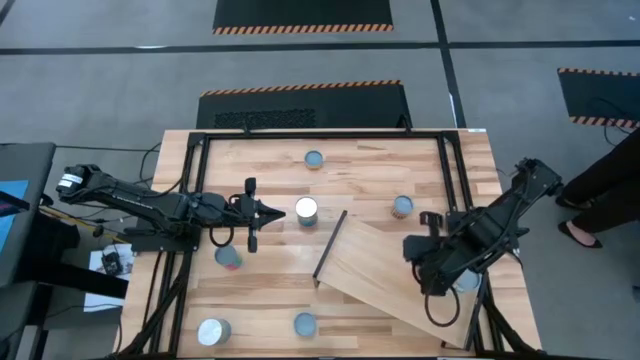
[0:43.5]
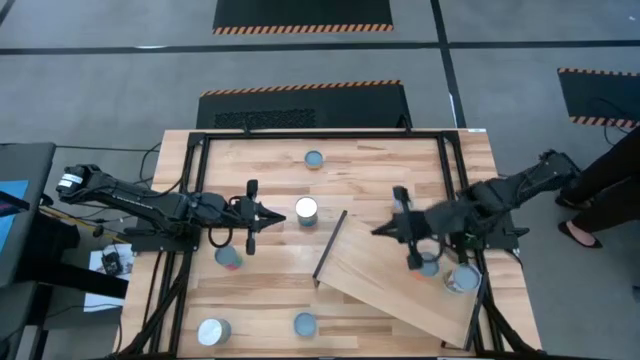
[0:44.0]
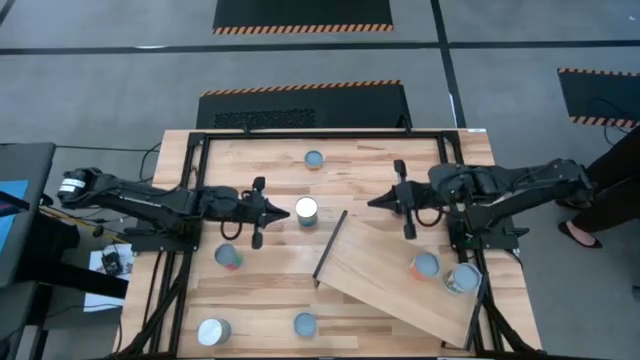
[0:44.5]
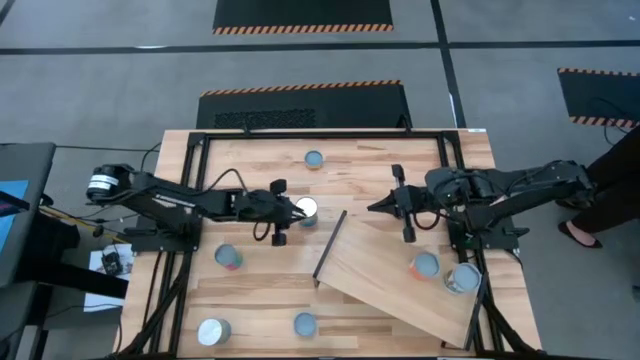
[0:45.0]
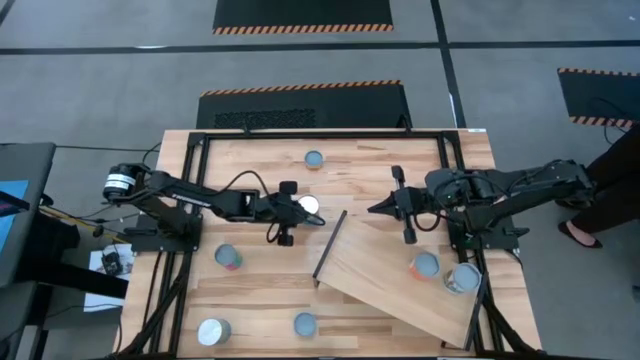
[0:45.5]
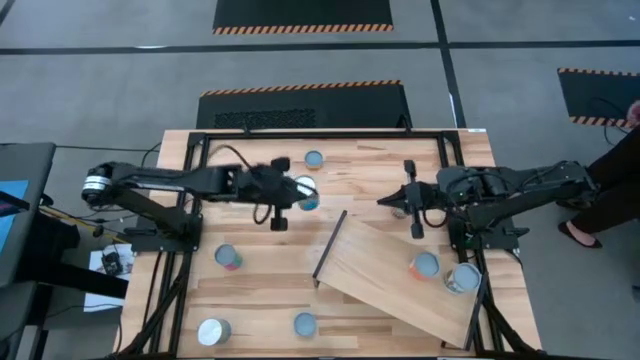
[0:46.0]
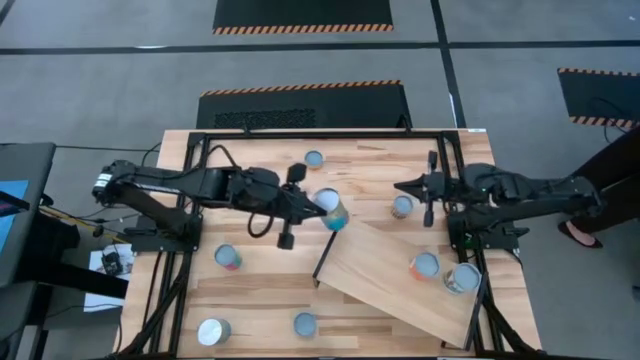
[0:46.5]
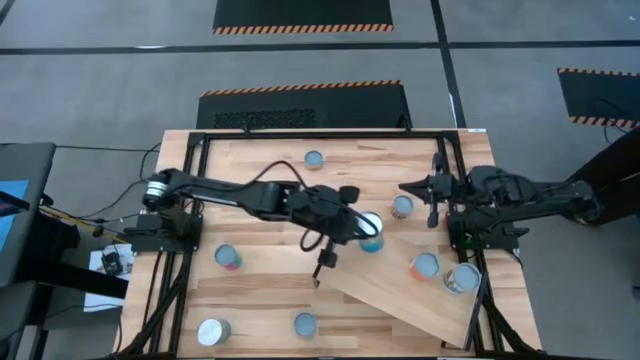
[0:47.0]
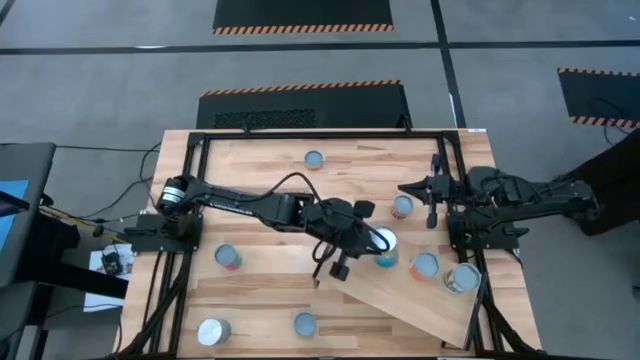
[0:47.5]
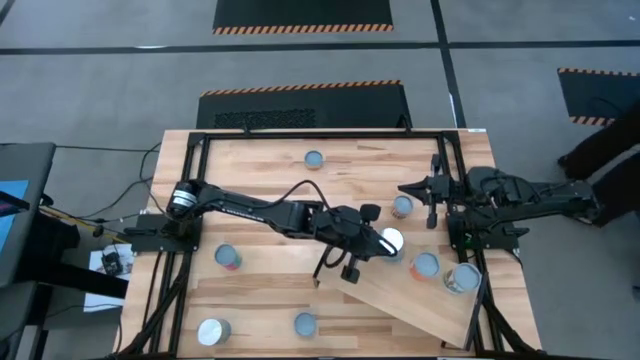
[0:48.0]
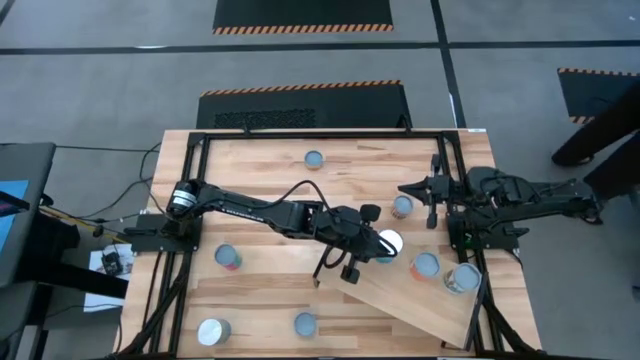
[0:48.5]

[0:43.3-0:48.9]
Task: Pick and place cans onto a shelf
Put the canned cherries on the shelf

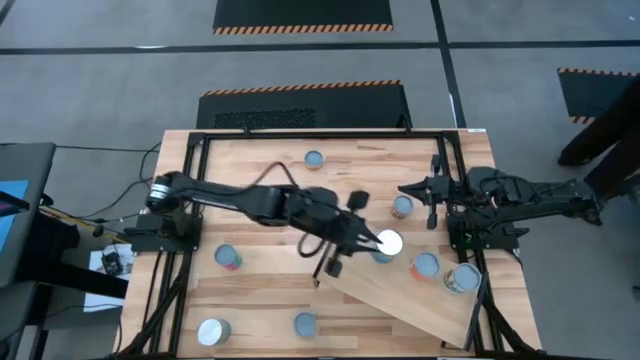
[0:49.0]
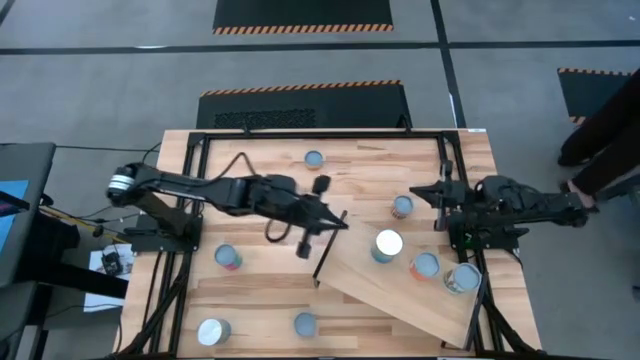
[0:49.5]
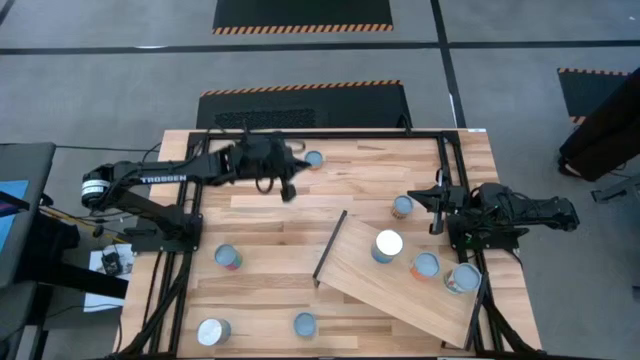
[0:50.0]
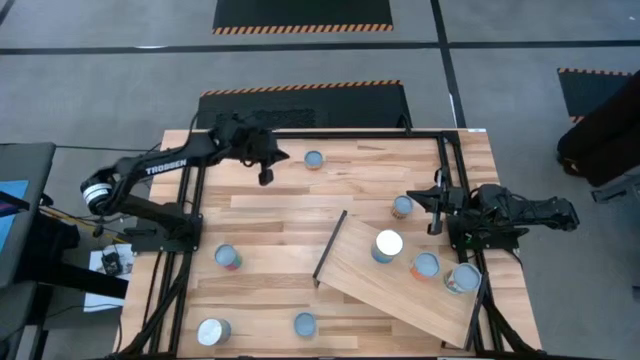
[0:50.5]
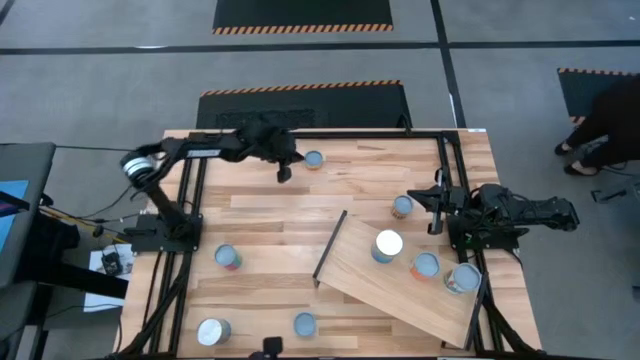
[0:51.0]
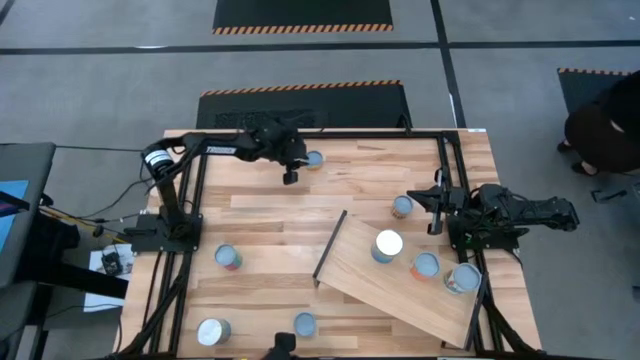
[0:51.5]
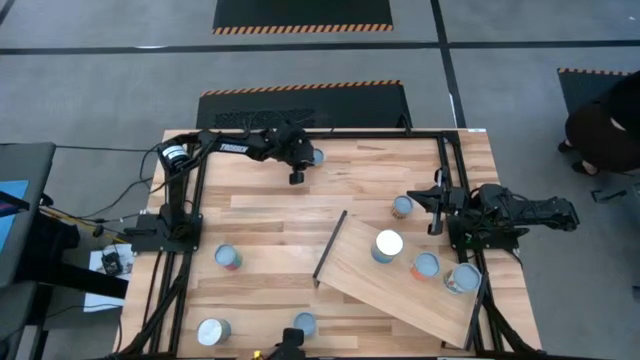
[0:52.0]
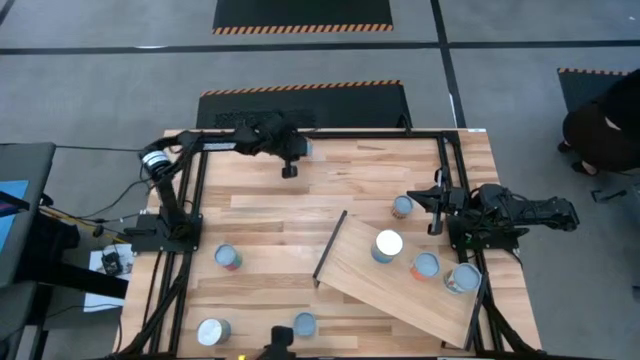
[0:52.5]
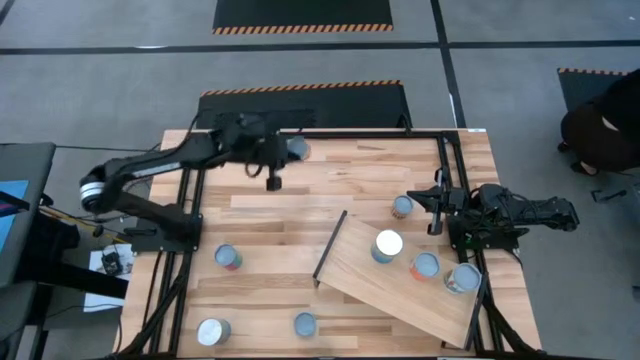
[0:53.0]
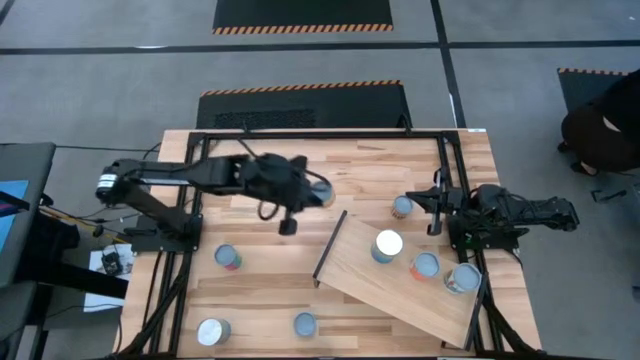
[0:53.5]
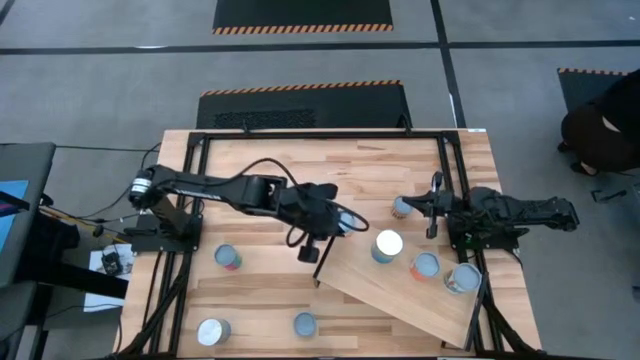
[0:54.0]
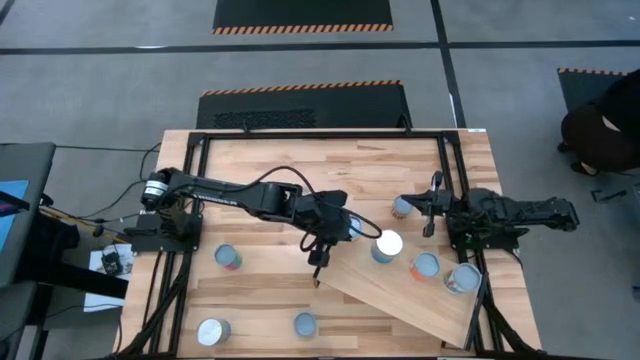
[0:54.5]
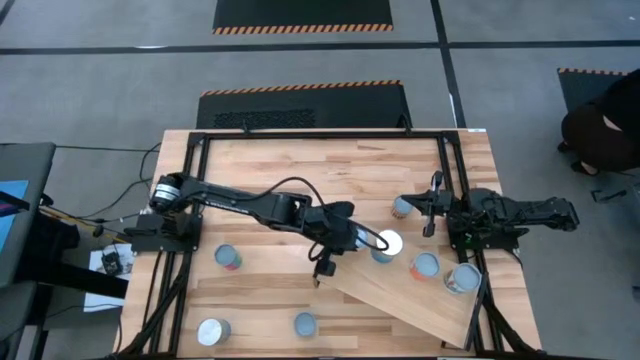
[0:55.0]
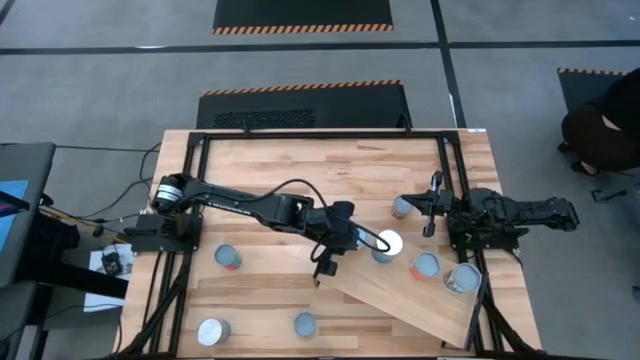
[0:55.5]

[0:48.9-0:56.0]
Put the canned mushrooms on the shelf

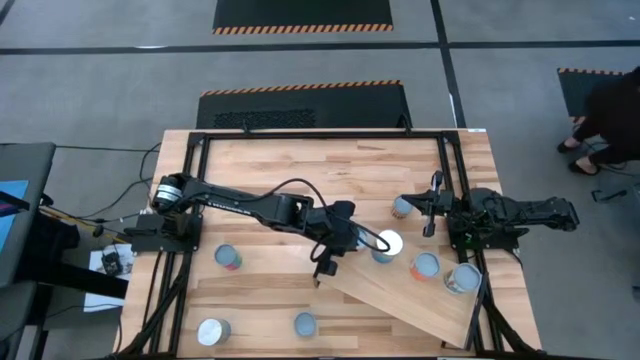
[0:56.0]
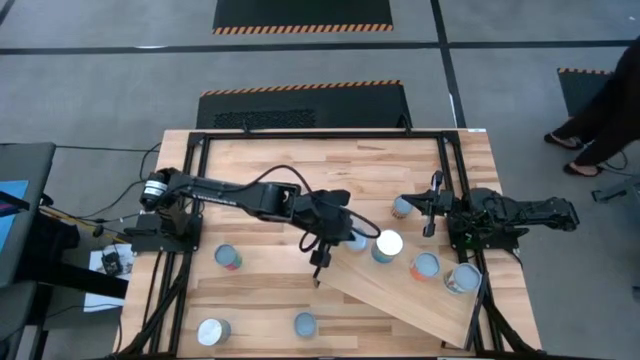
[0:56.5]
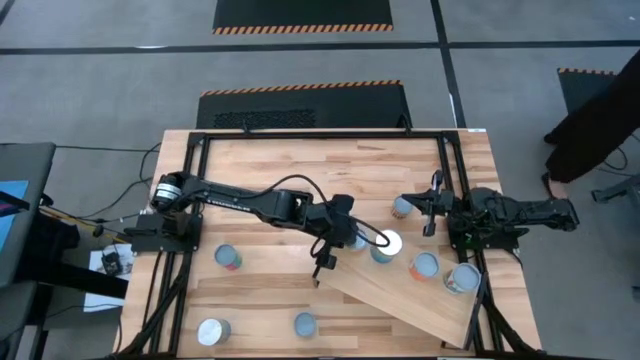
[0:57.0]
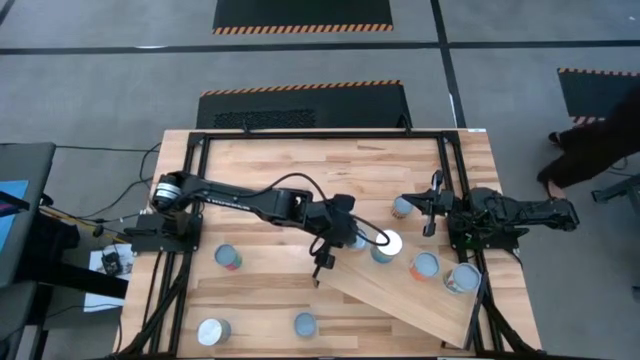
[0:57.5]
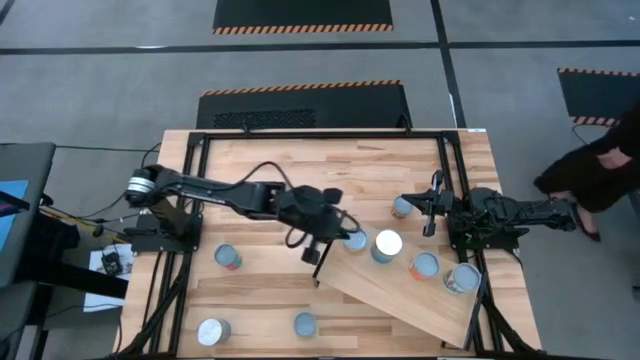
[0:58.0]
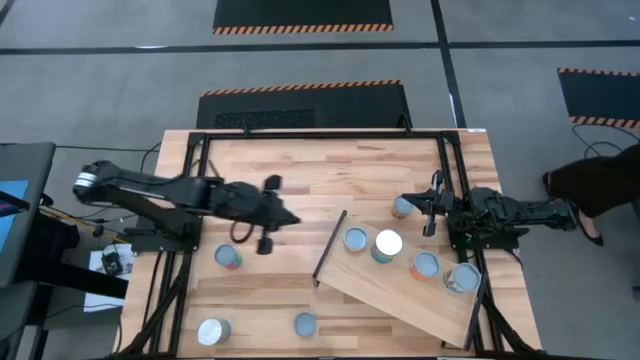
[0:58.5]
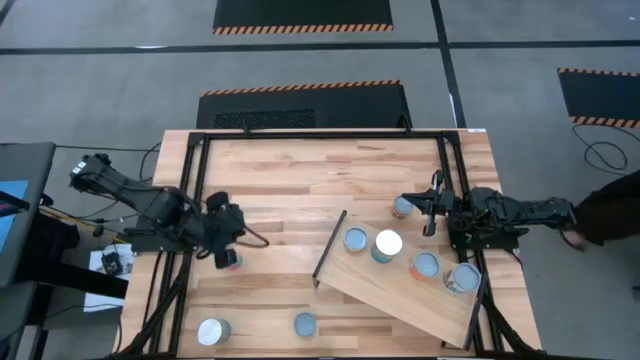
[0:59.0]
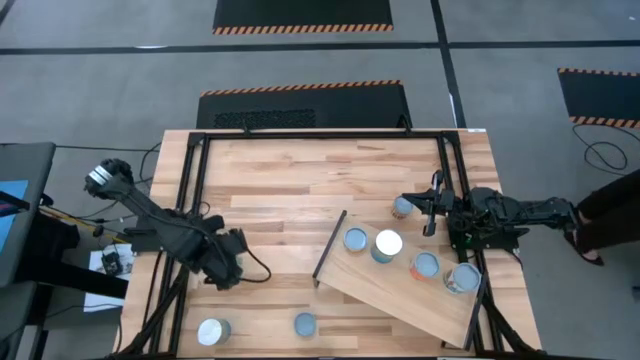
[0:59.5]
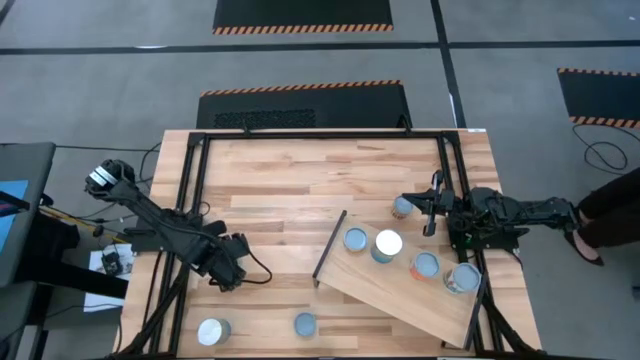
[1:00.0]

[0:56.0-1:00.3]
Put the canned chicken soup on the shelf

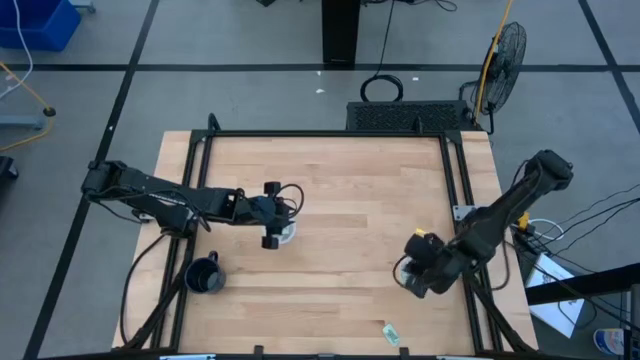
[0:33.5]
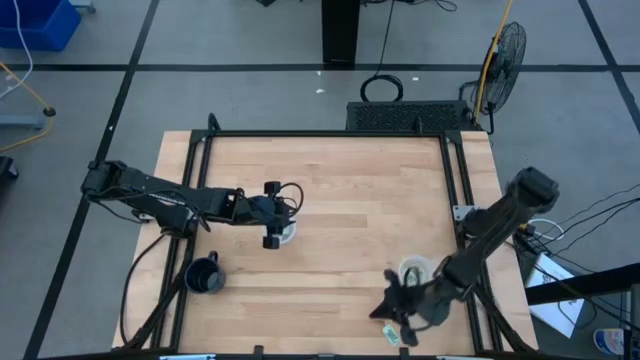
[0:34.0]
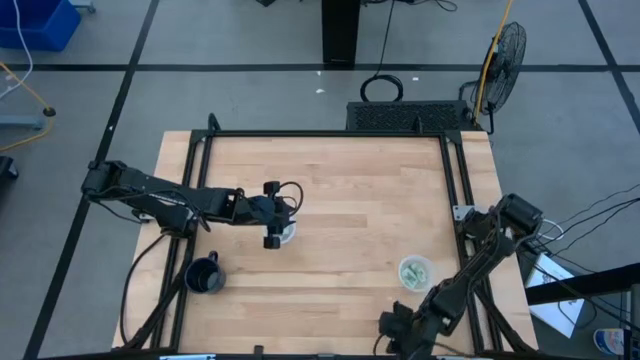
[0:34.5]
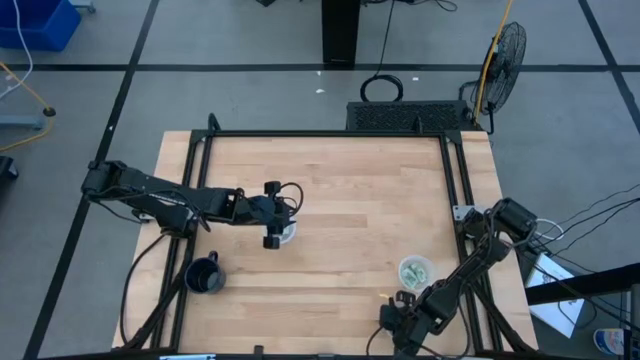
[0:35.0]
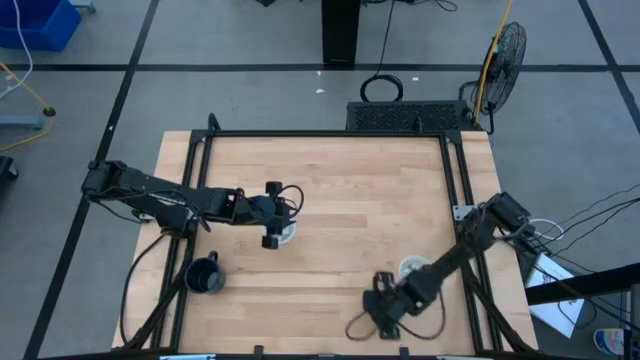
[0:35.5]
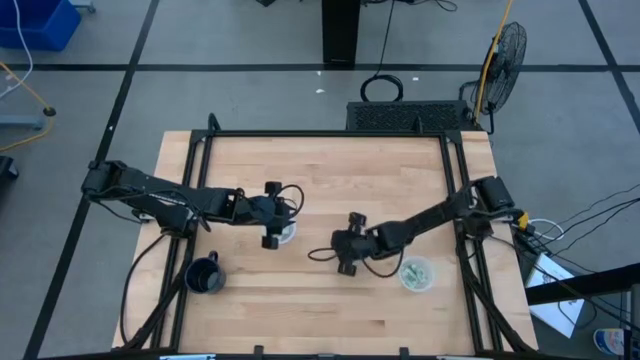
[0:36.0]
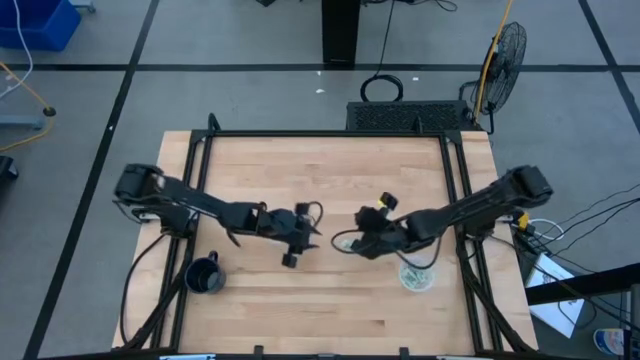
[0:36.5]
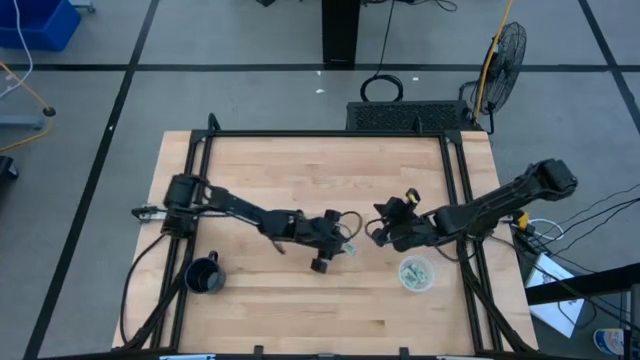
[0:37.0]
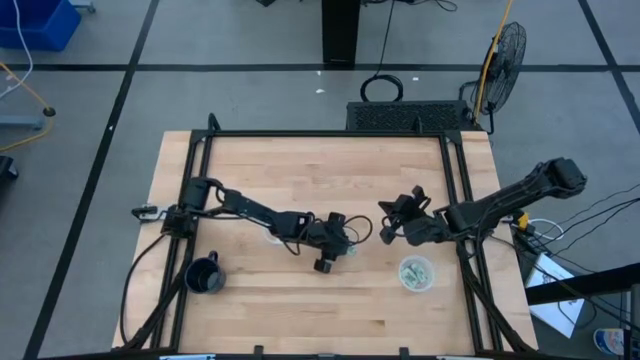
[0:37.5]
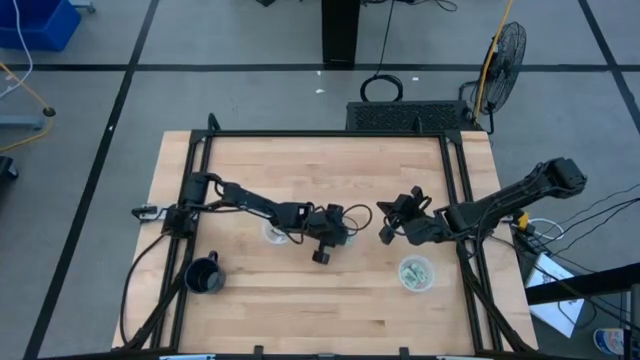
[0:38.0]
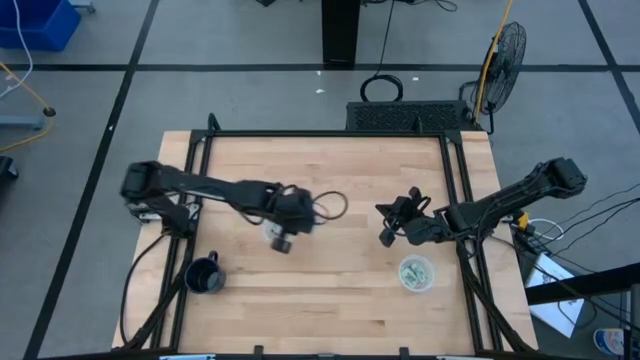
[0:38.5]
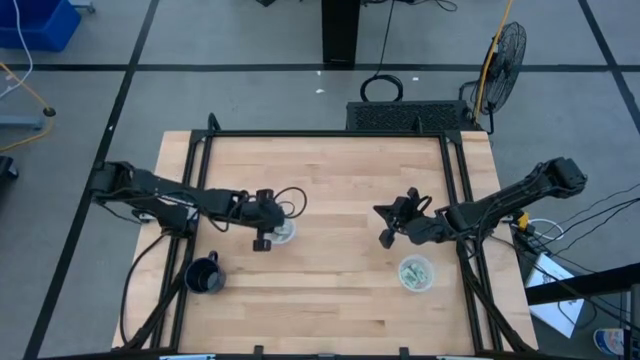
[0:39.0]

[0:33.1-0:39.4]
Task: Pick and place Stevia / Truvia into bins
Put the green stevia packet into the left transparent container
